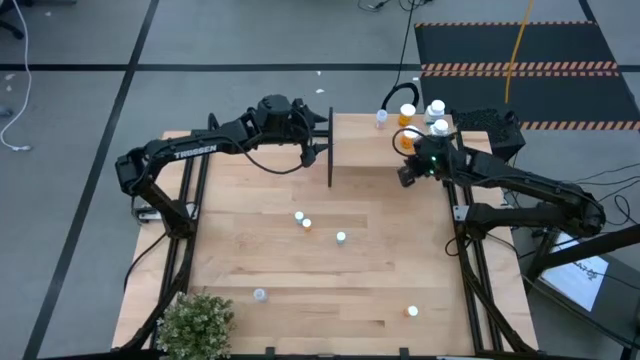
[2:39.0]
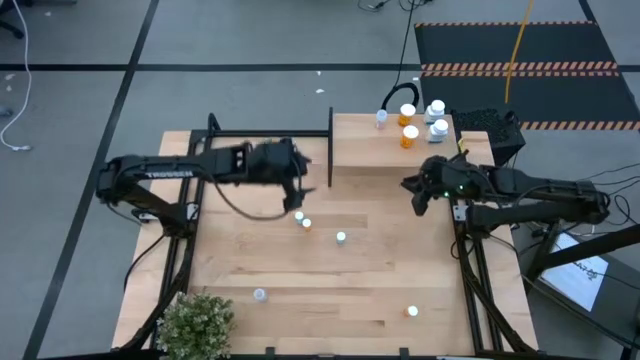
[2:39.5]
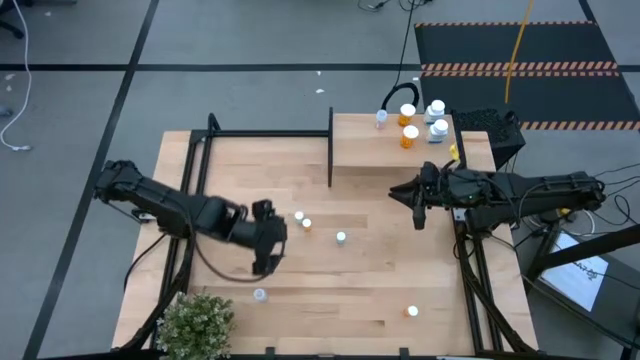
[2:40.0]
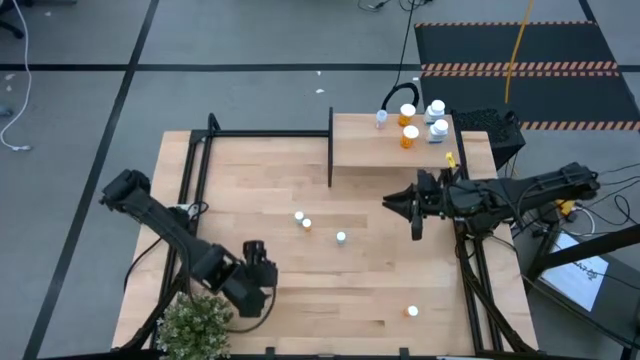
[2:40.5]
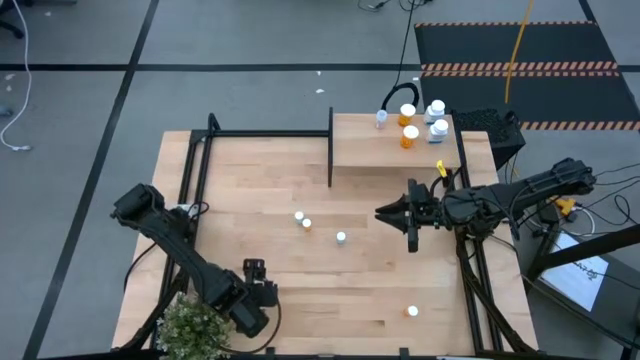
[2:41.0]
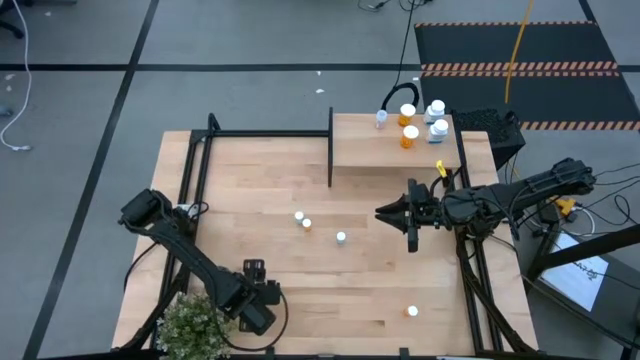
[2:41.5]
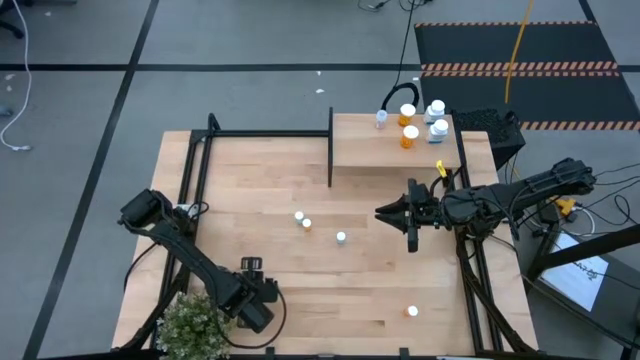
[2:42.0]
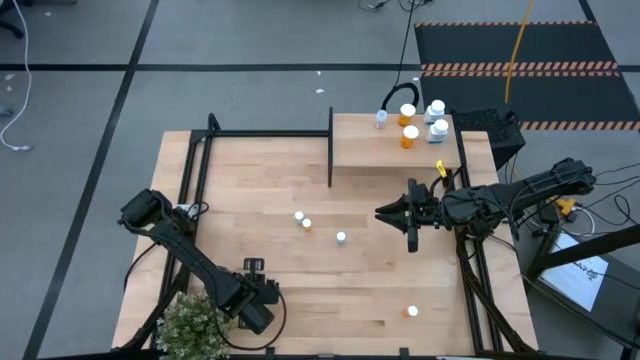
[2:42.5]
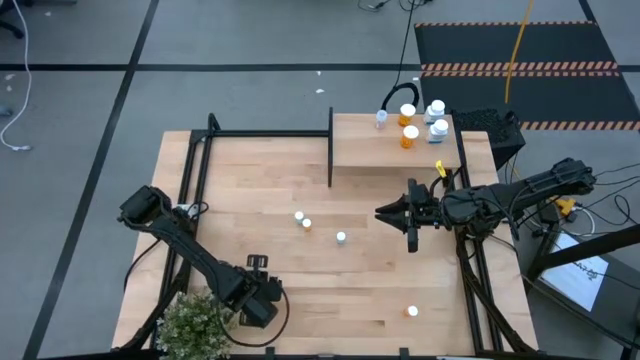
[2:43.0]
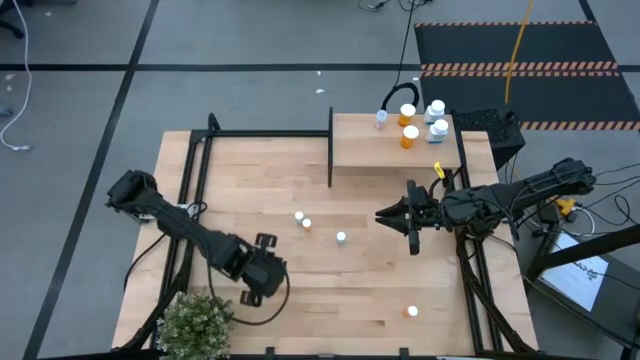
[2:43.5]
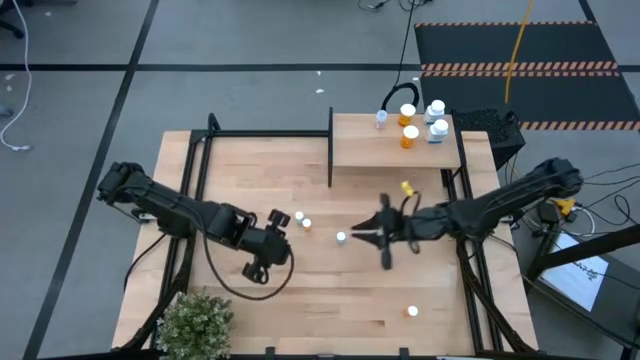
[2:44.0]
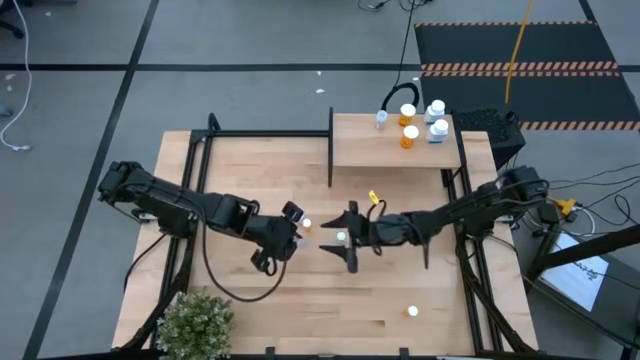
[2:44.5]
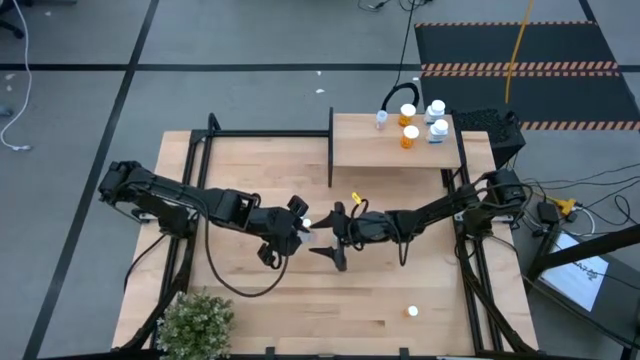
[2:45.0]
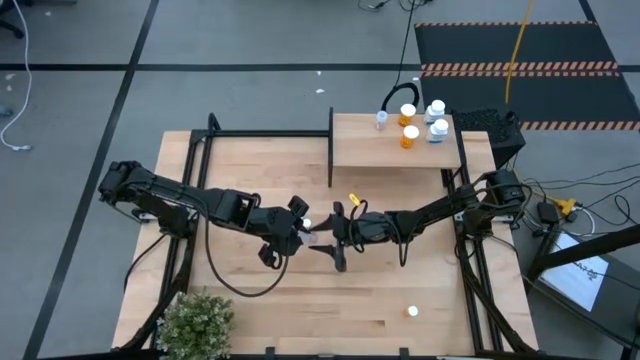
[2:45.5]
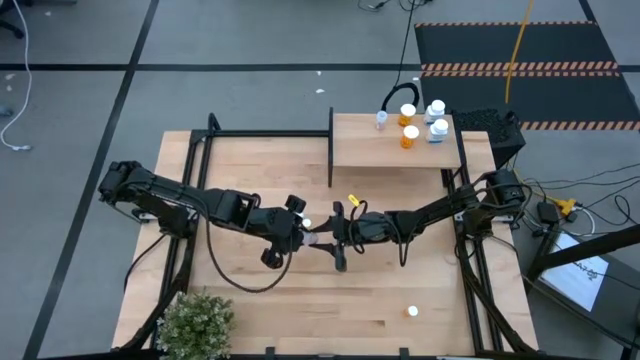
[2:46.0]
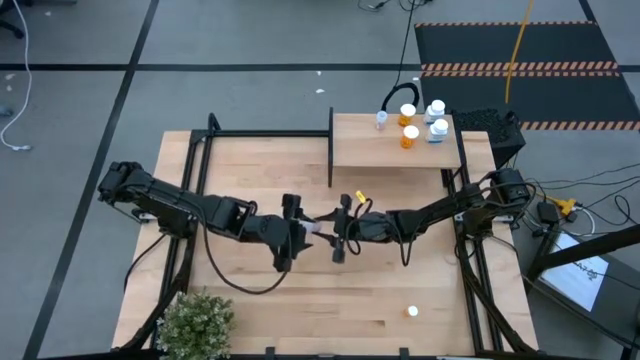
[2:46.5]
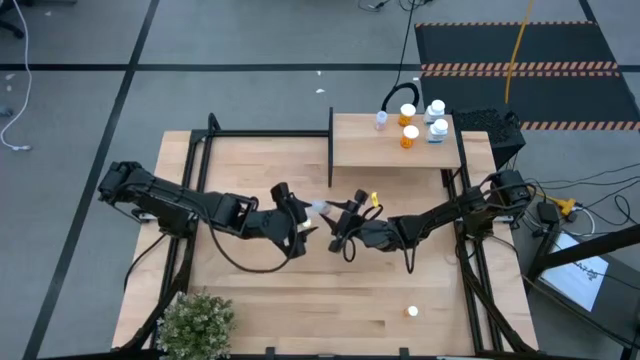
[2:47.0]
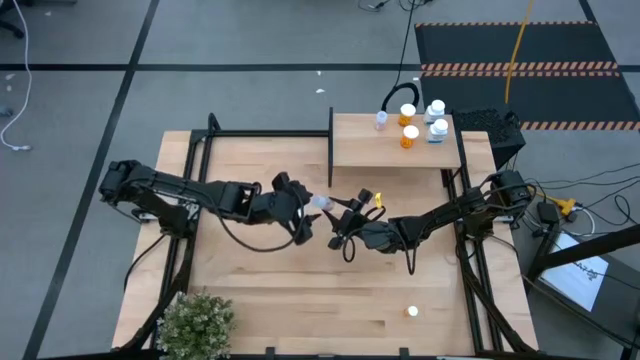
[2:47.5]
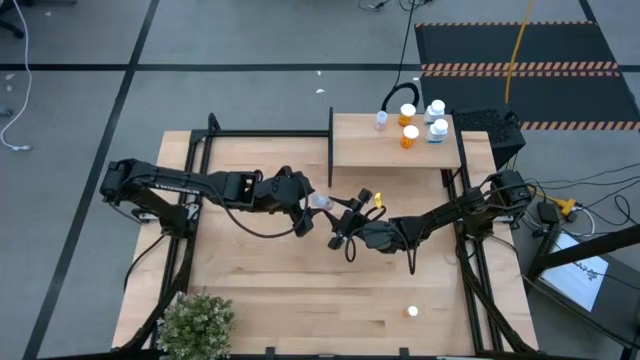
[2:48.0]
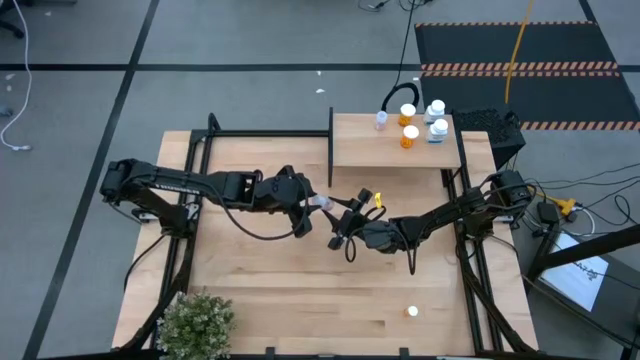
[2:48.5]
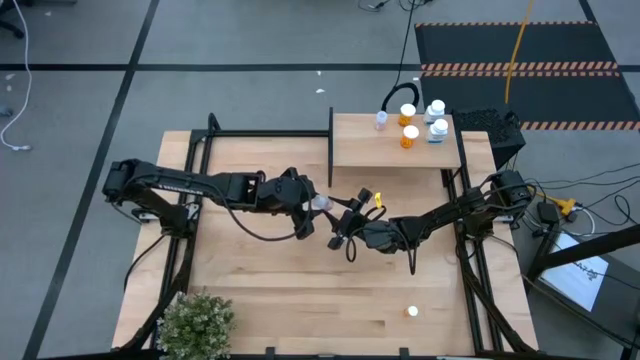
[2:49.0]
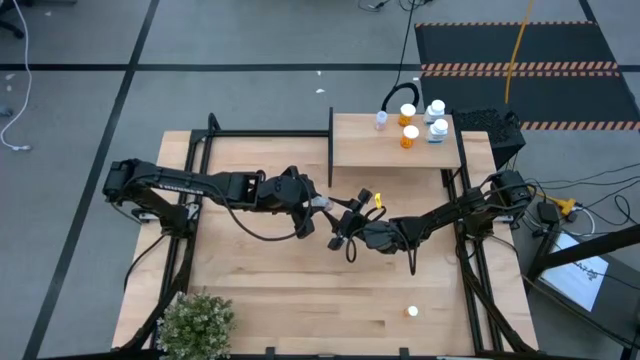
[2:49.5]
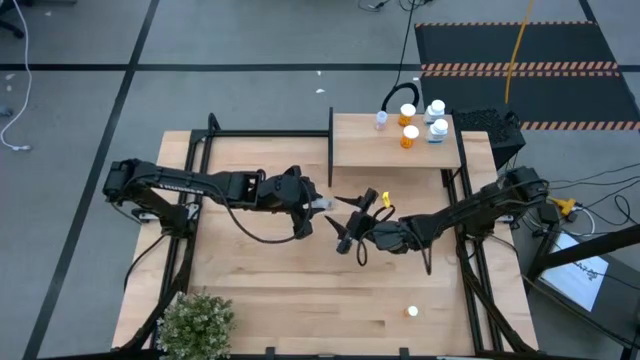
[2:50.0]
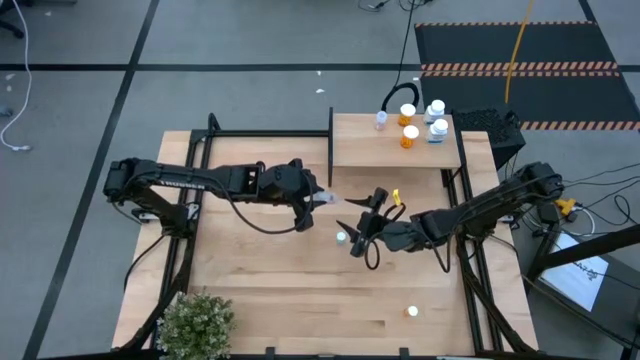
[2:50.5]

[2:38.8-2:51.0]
Task: Pick and place medicine bottles onto shelf by color
Put the transparent pill bottle on the shelf aligned with the other transparent pill bottle

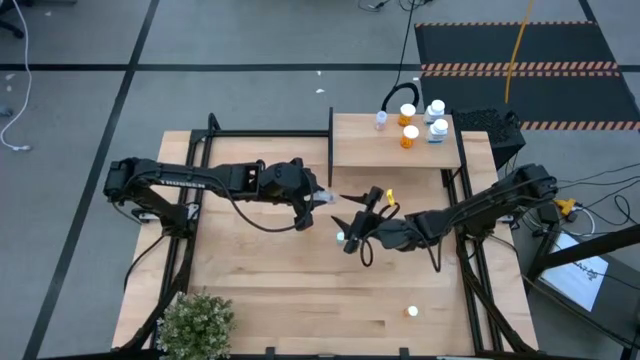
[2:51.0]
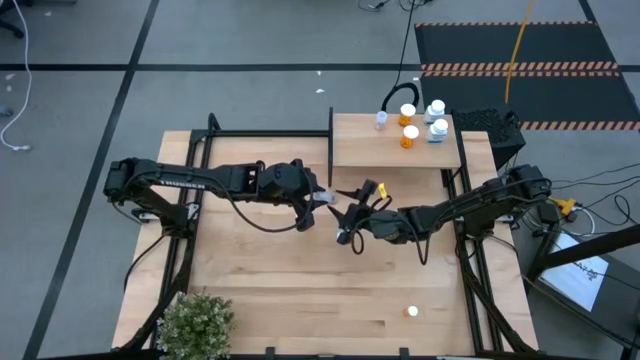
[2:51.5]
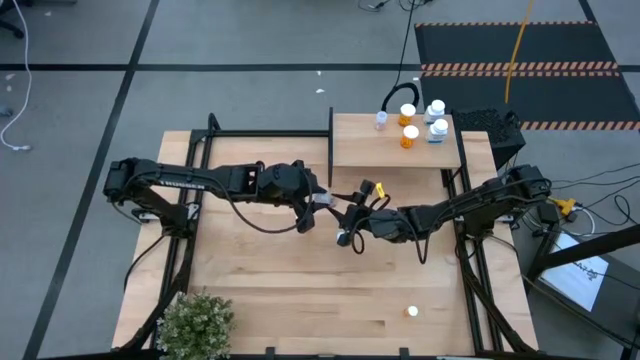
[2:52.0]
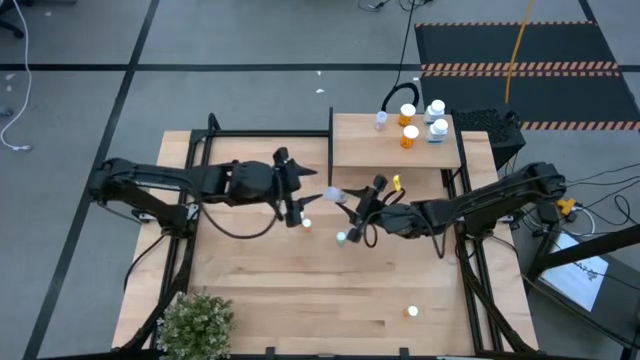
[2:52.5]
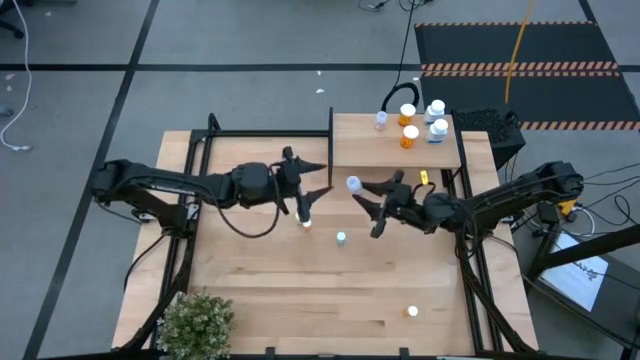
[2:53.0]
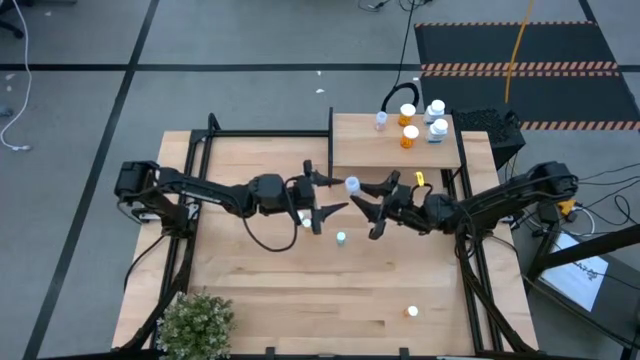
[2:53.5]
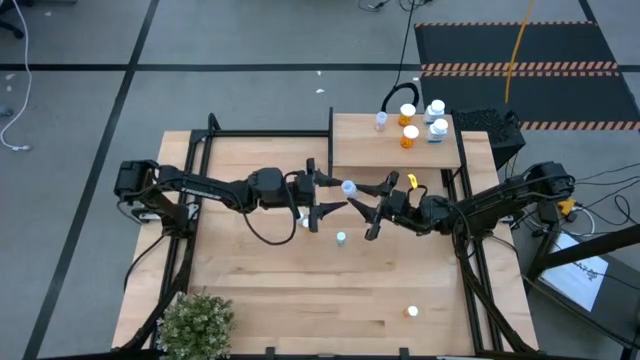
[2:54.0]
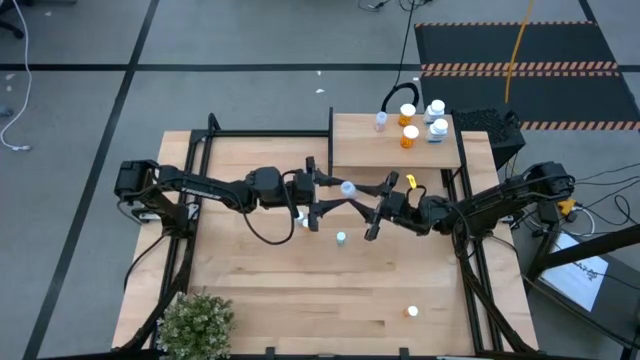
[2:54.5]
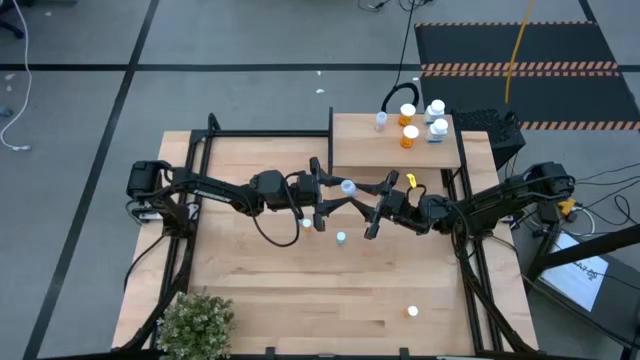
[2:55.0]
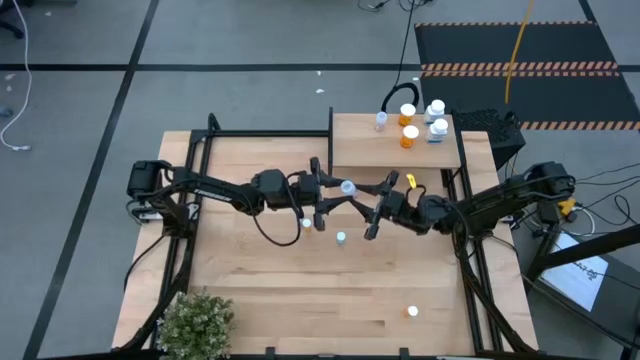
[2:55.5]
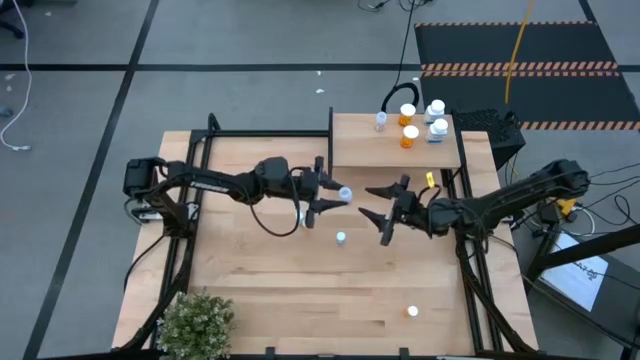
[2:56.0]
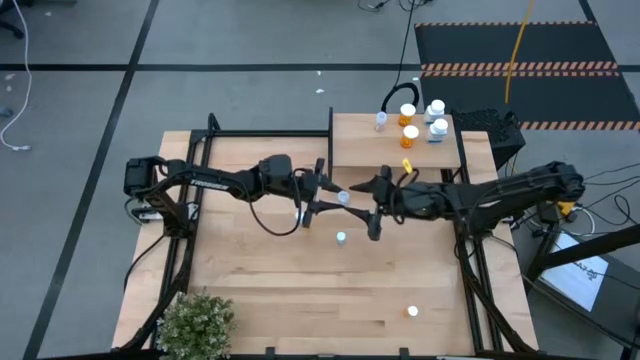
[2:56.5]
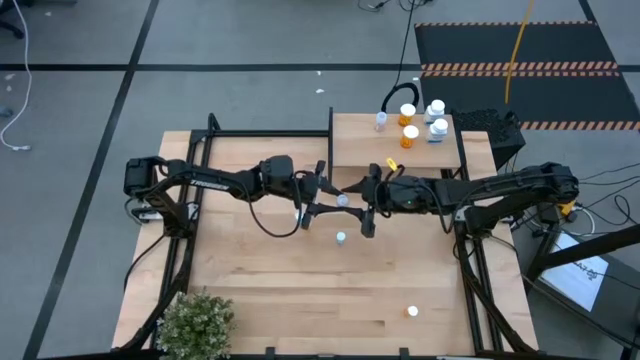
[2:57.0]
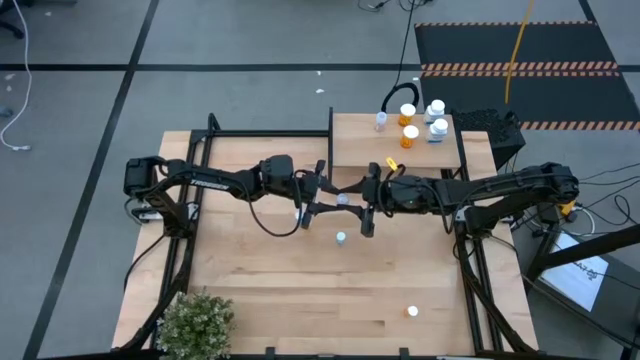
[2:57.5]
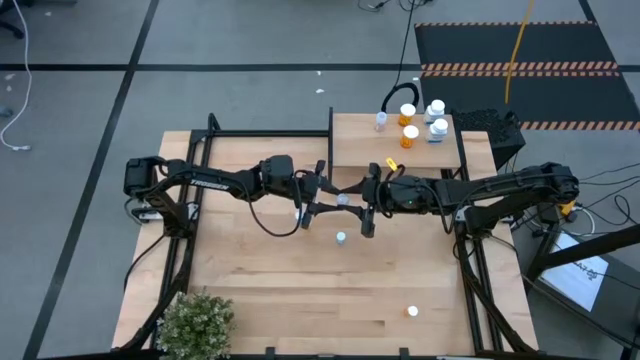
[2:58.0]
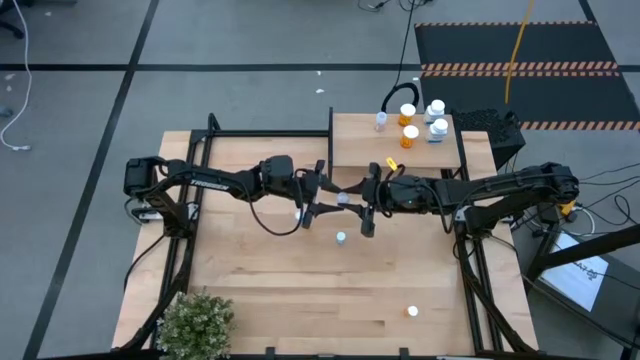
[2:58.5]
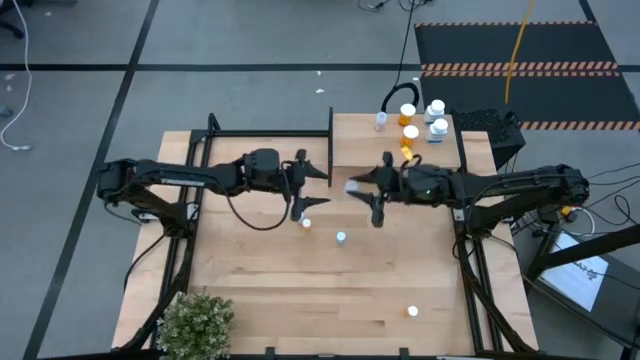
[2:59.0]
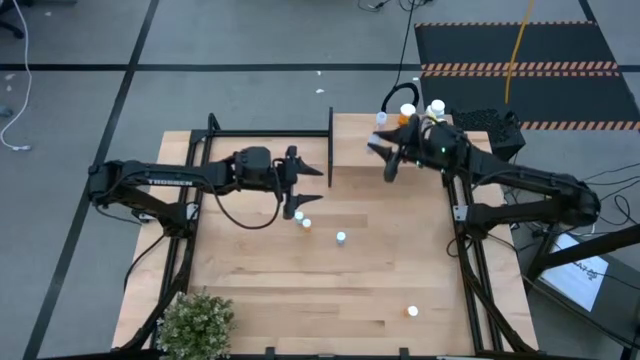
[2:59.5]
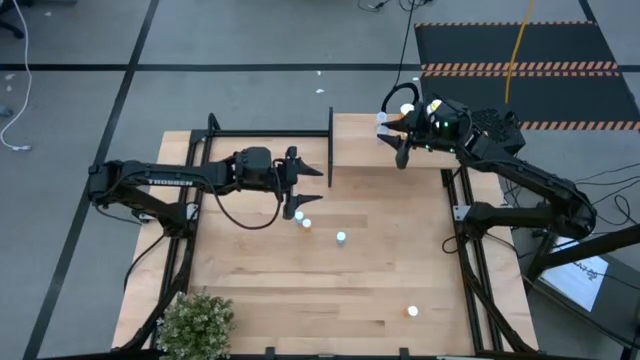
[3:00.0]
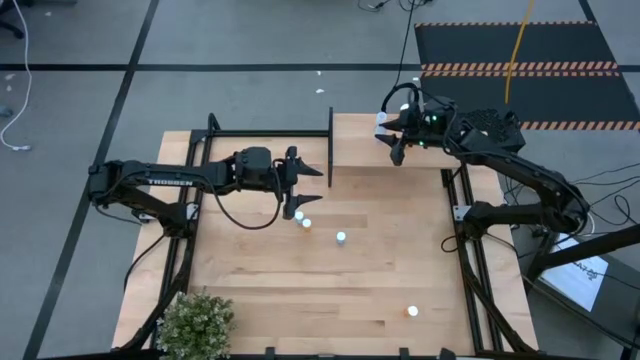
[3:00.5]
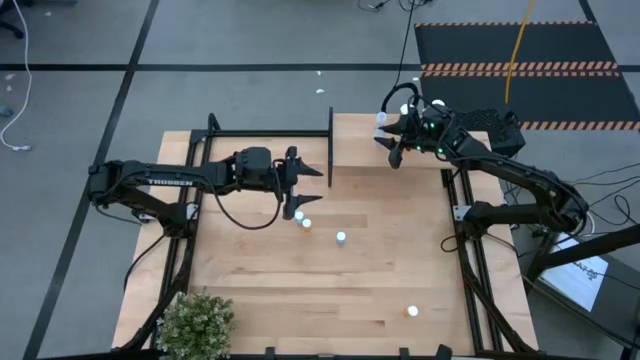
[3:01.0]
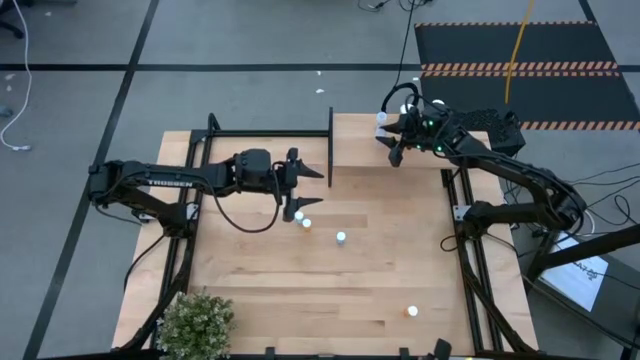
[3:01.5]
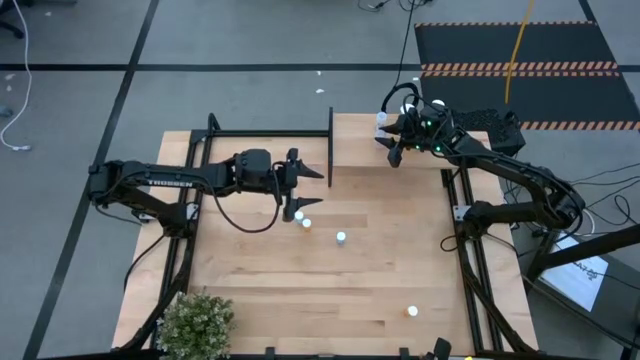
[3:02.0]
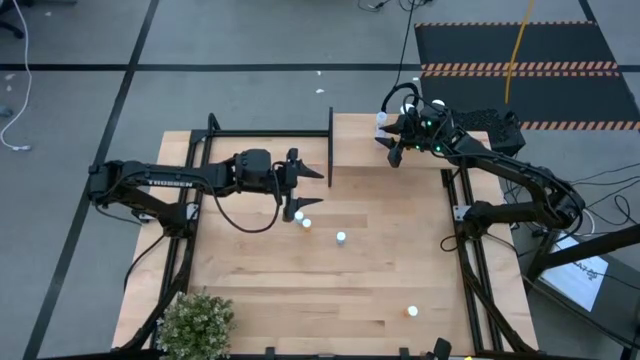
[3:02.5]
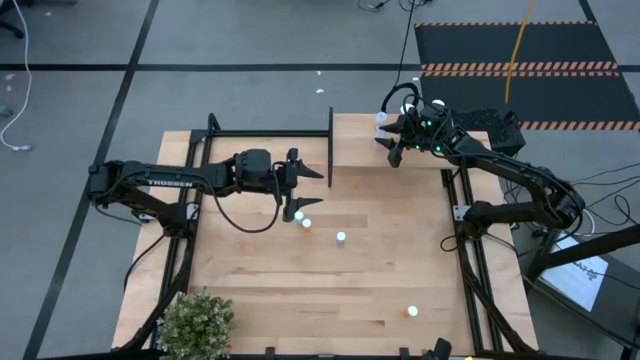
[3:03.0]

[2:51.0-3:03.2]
Put the transparent pill bottle on the shelf aligned with the other transparent pill bottle
